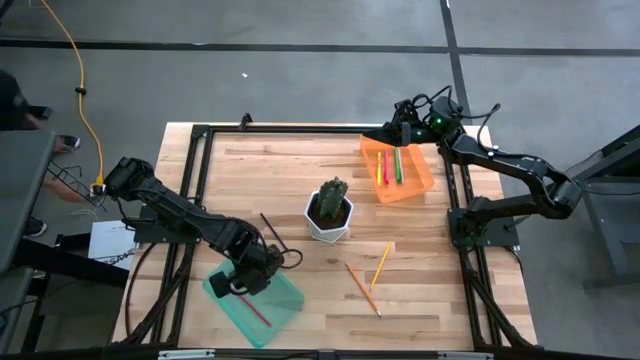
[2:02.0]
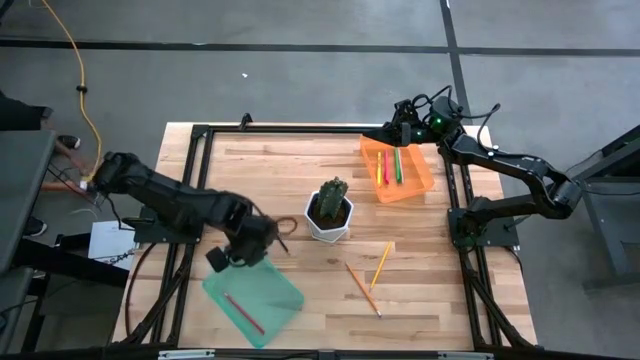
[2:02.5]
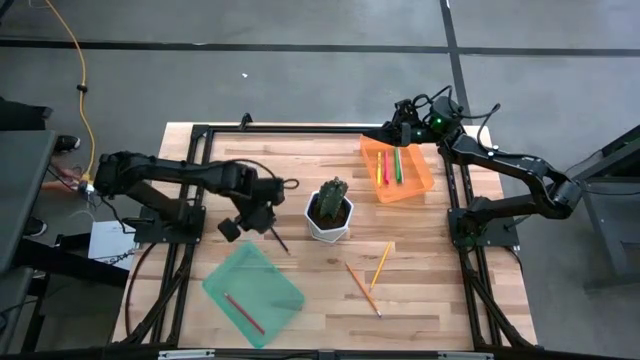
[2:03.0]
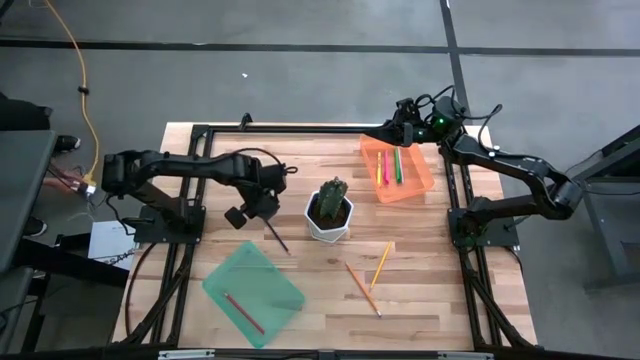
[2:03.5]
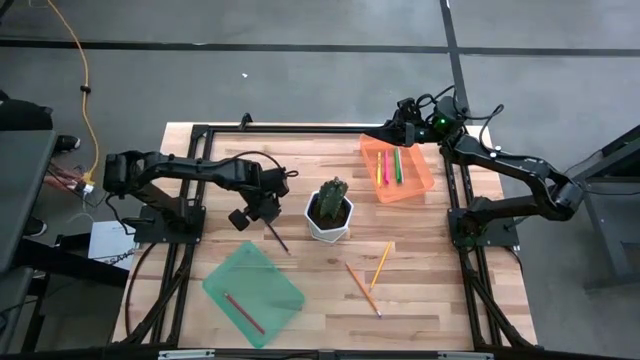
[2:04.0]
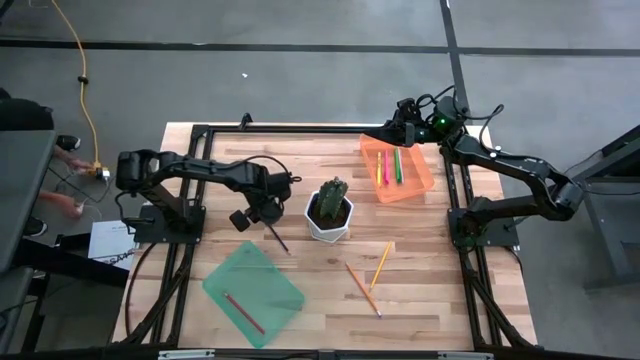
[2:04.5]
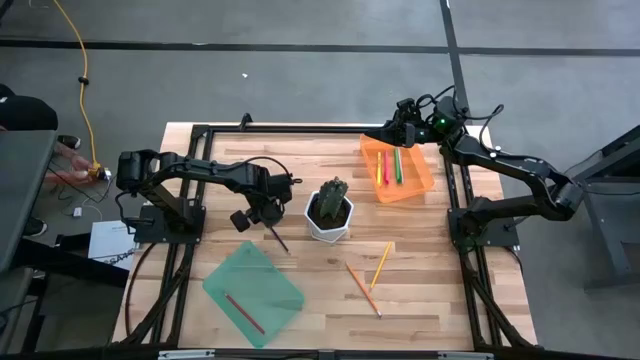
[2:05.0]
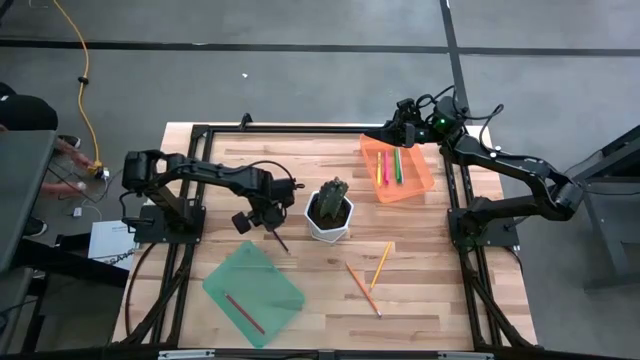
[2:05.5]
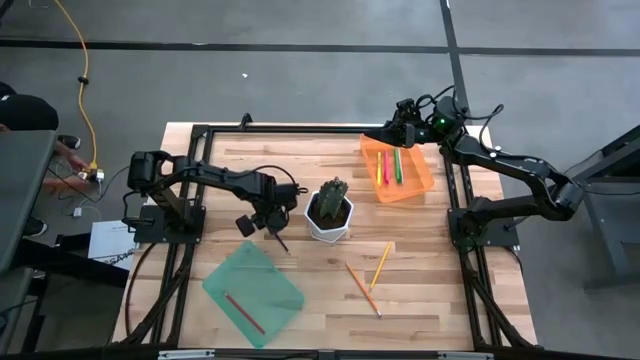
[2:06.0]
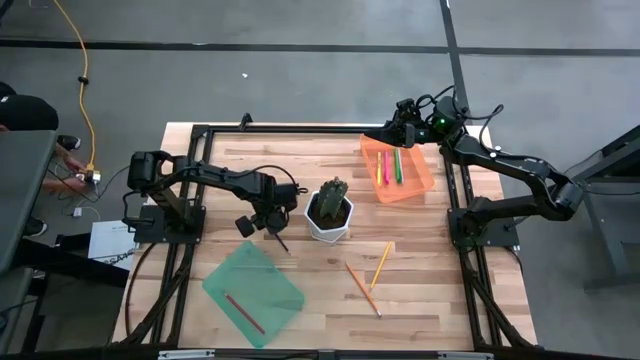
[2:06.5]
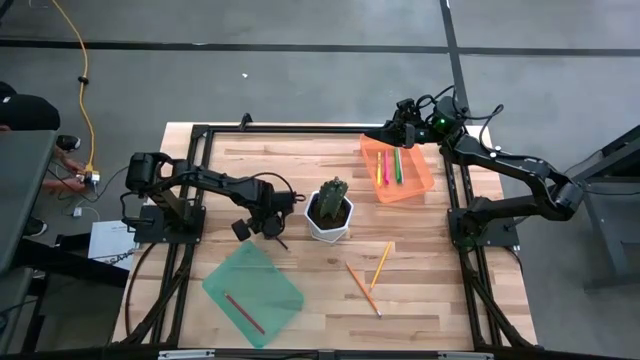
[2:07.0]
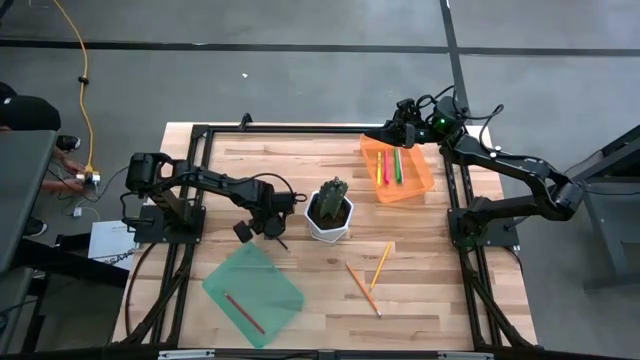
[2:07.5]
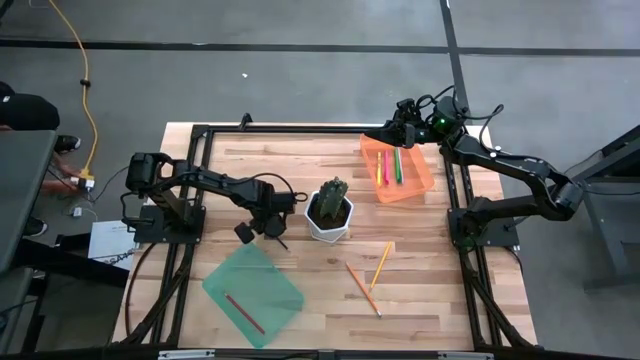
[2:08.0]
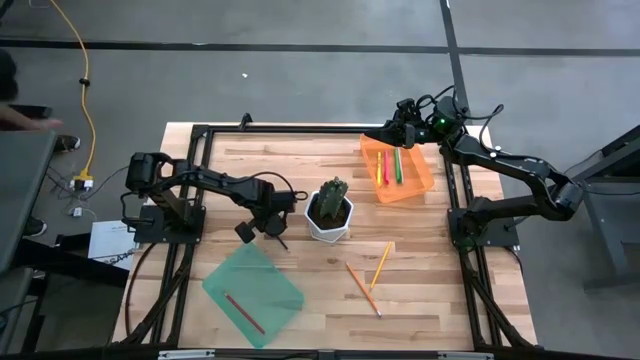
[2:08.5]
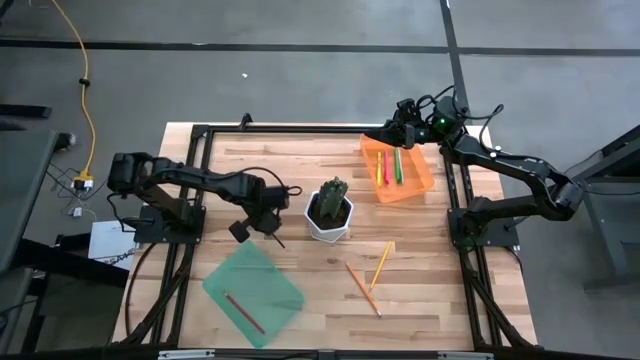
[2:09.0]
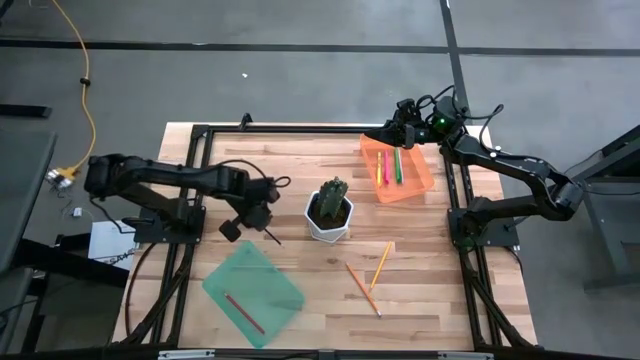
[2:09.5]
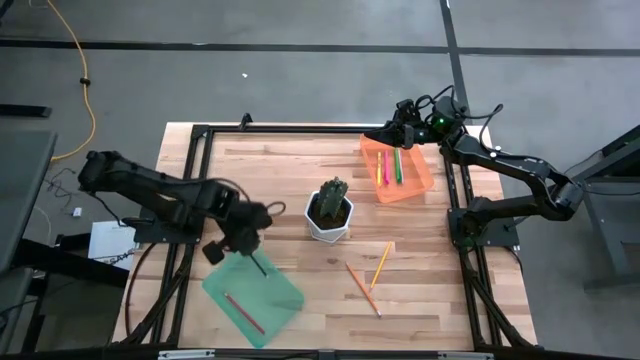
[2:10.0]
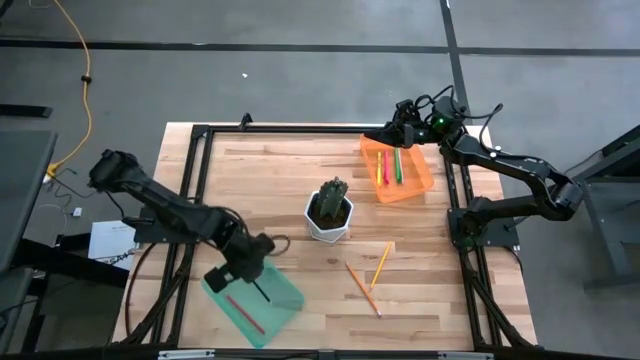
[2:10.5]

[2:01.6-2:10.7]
Task: Sort pens & pencils
Put the blue pencil into the green bin

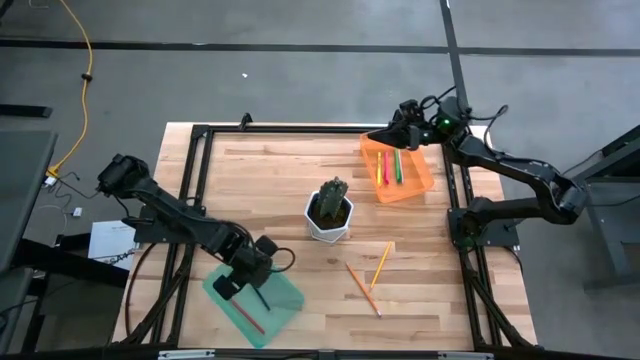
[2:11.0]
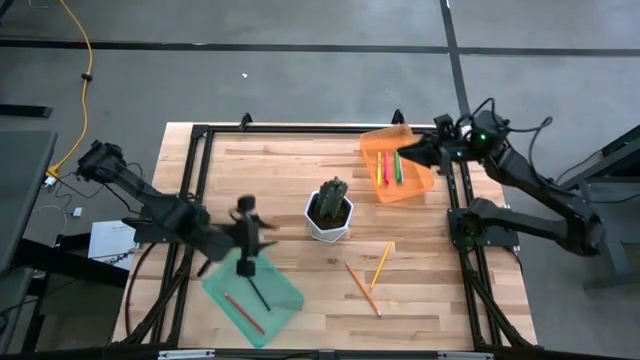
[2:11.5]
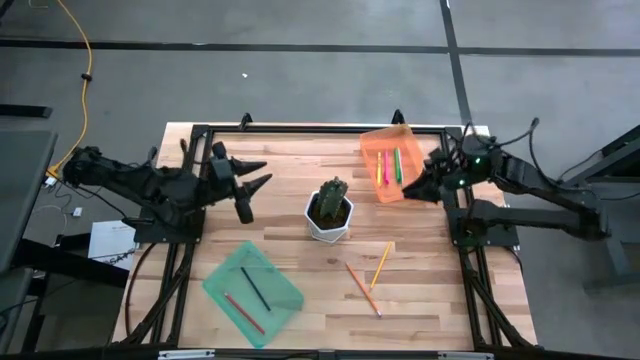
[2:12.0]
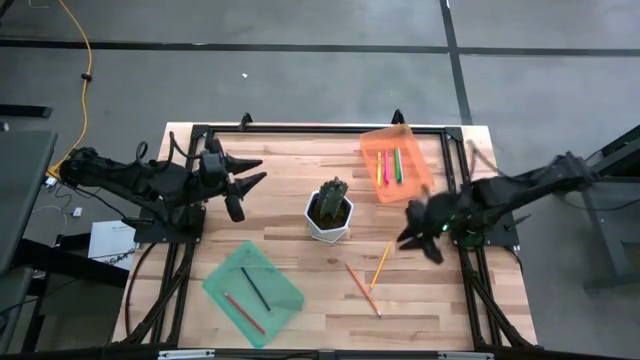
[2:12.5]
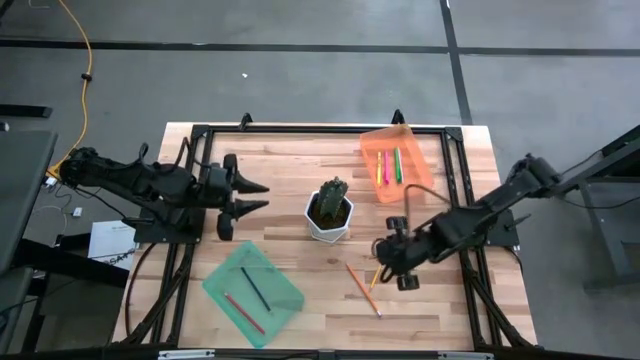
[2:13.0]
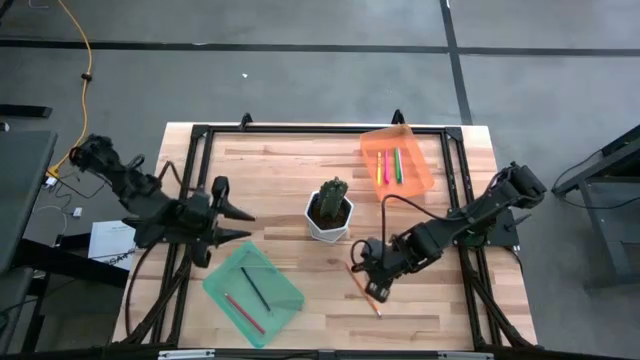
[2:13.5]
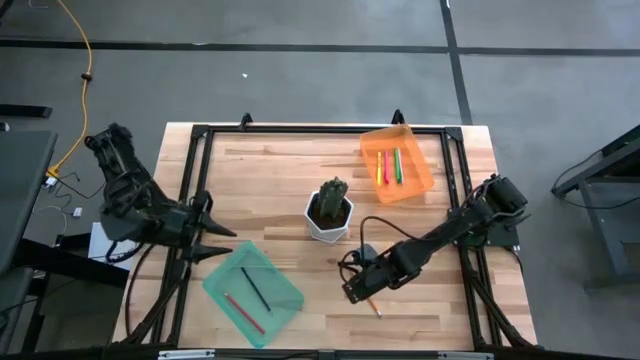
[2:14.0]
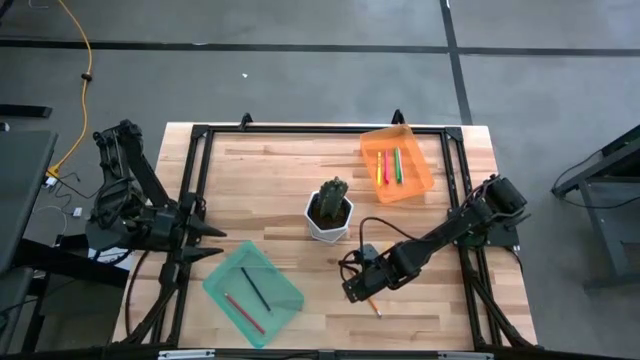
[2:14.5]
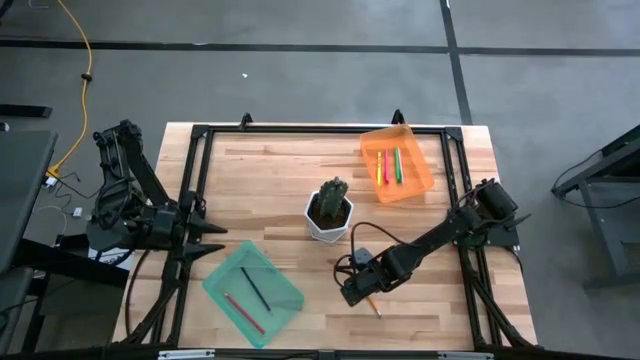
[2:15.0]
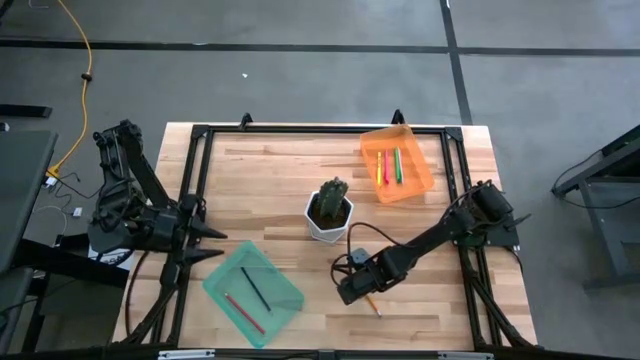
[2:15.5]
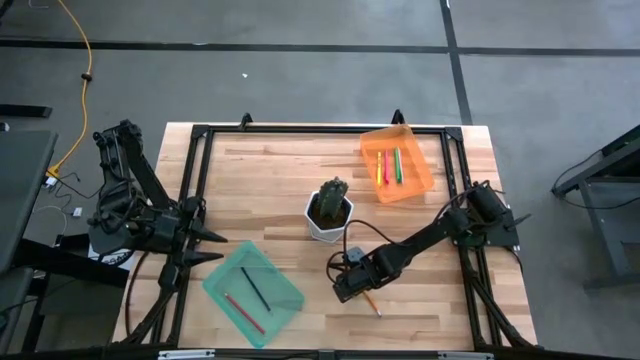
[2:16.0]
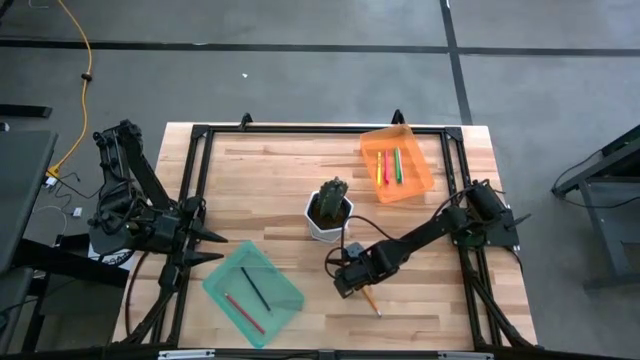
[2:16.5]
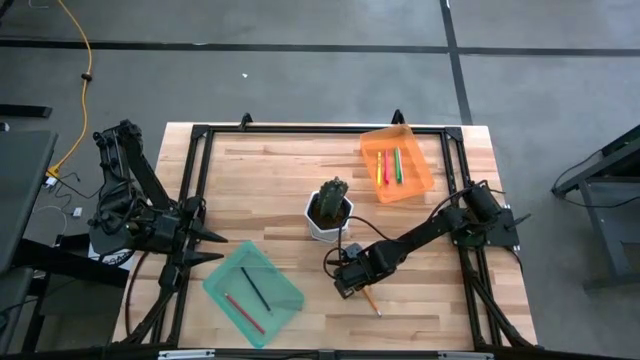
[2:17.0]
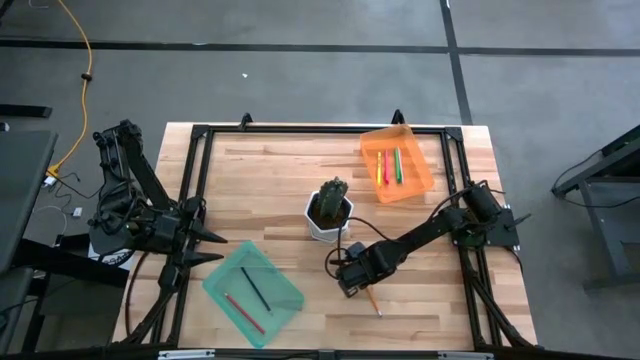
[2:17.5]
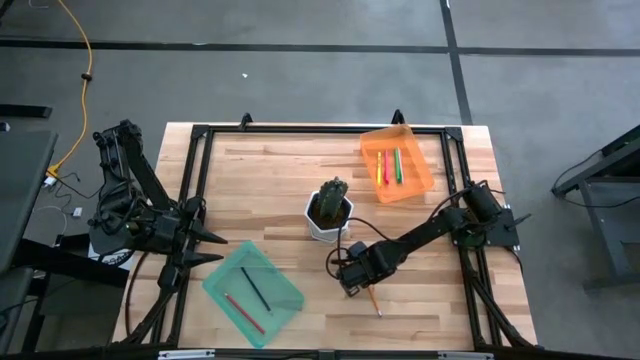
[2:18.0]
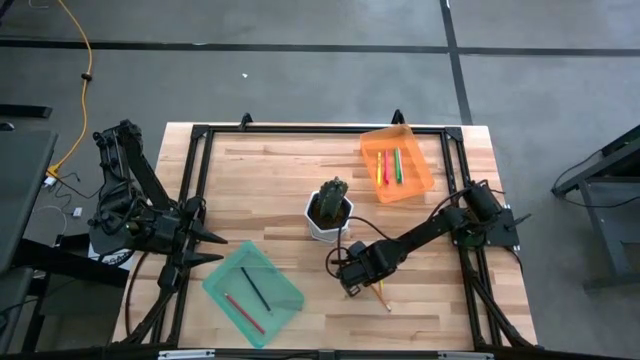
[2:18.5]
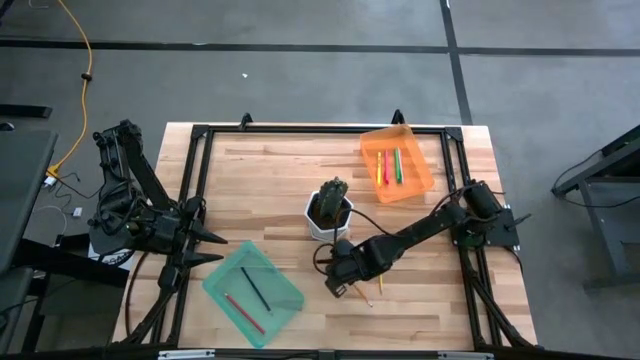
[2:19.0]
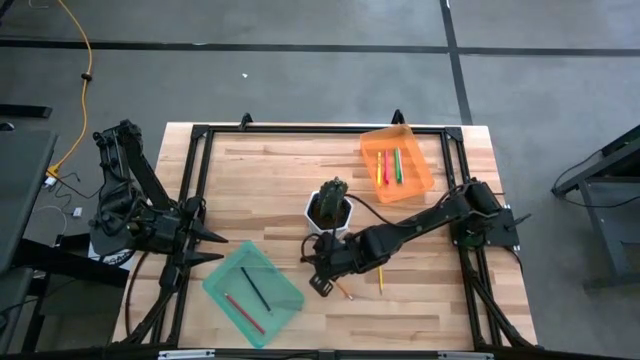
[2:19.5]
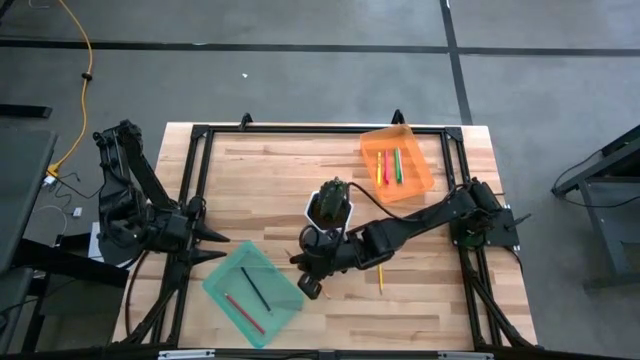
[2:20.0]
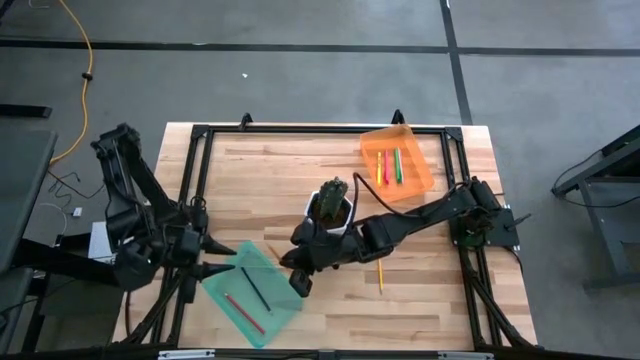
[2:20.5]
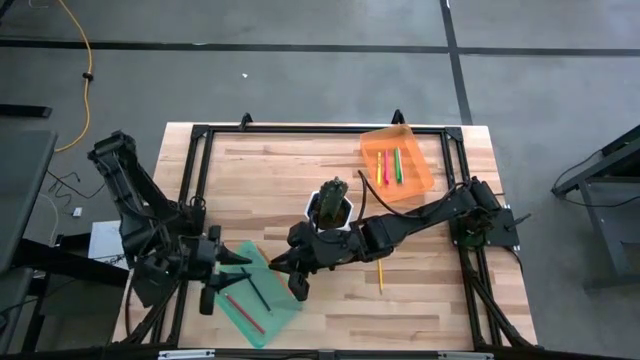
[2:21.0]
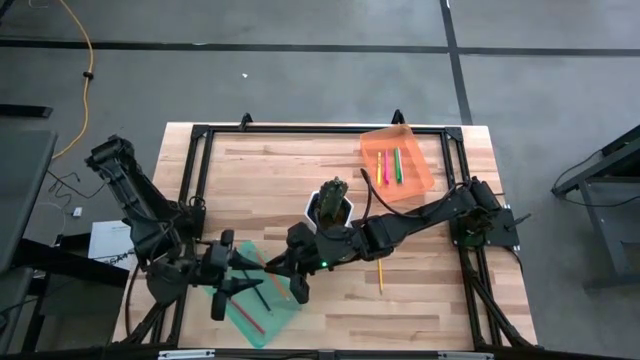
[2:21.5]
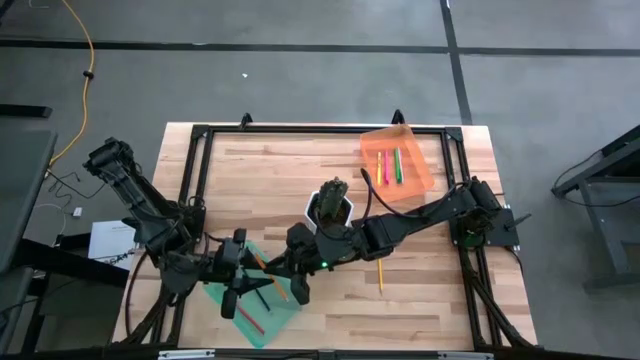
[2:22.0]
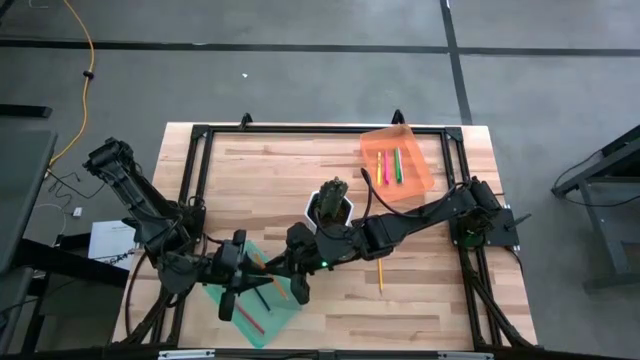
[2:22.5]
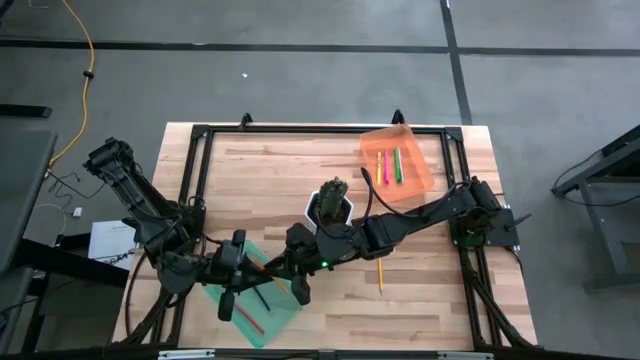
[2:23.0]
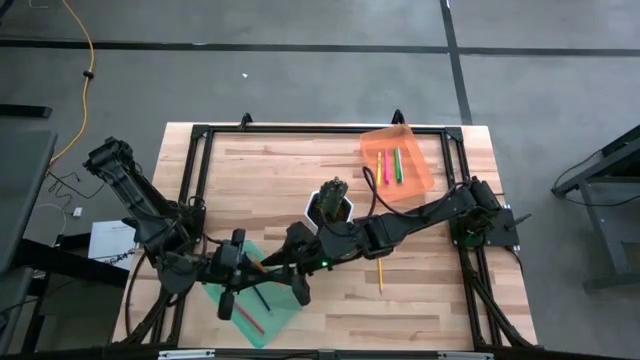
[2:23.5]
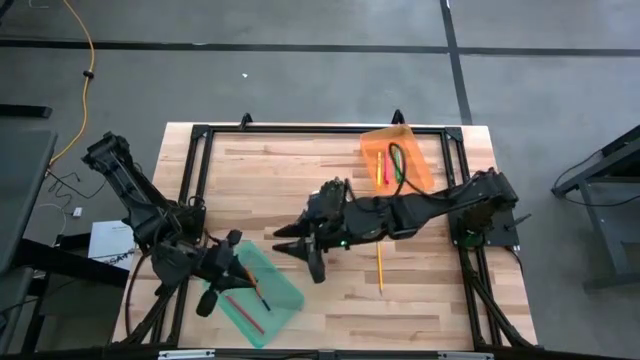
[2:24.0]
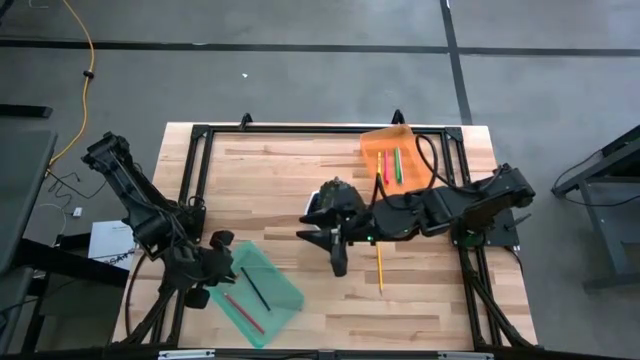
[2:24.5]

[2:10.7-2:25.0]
Put the orange pencil into the green bin
